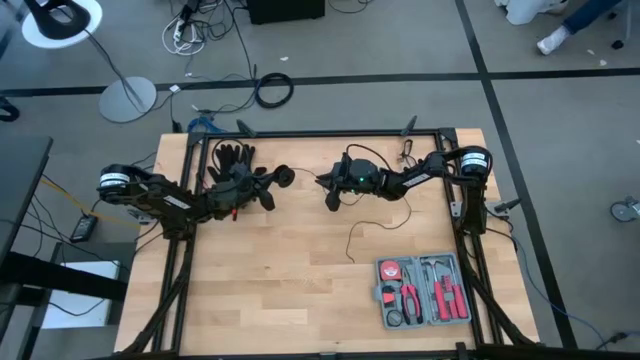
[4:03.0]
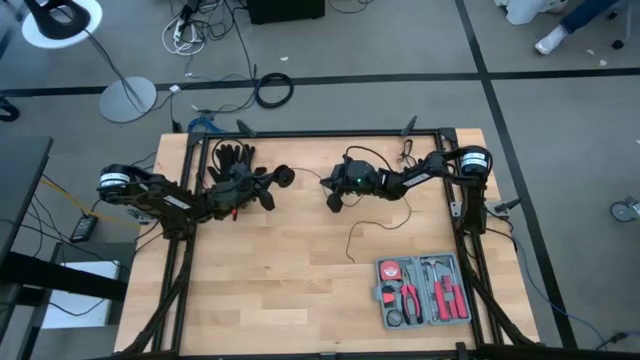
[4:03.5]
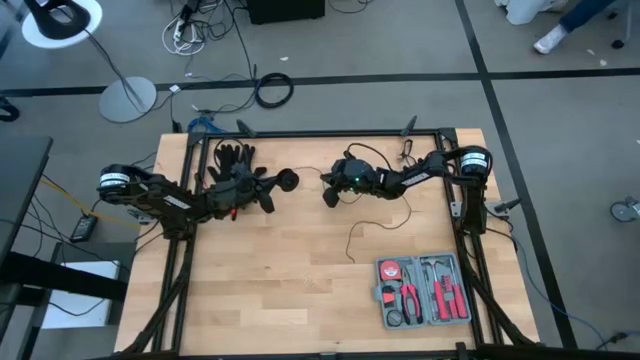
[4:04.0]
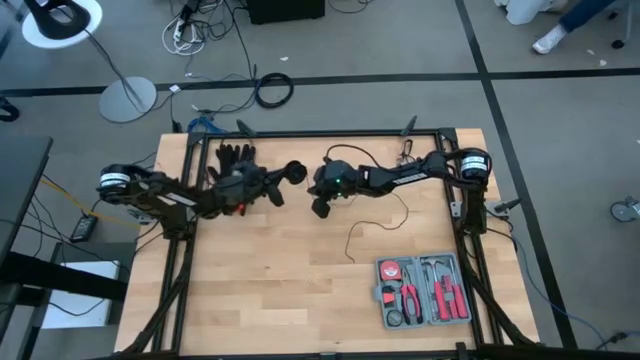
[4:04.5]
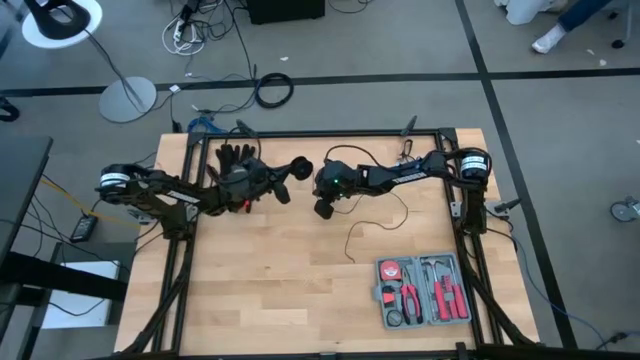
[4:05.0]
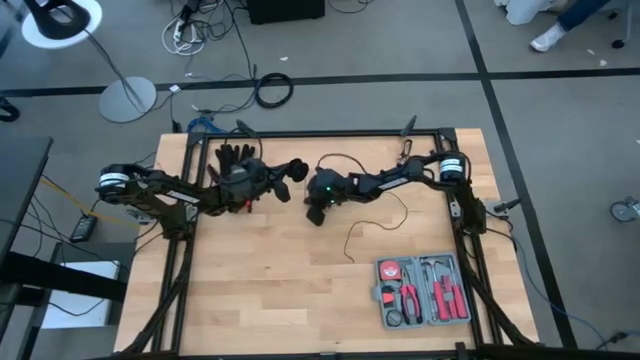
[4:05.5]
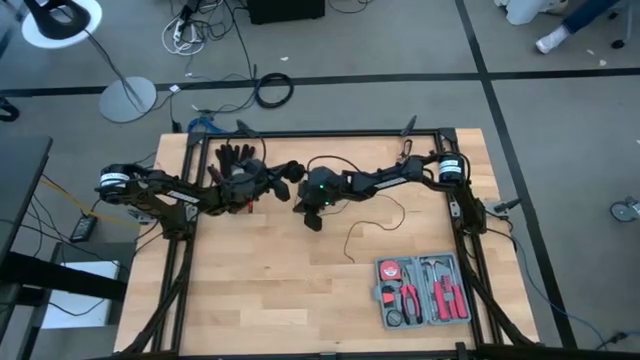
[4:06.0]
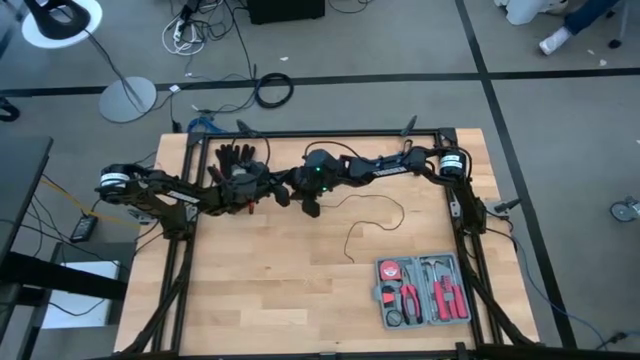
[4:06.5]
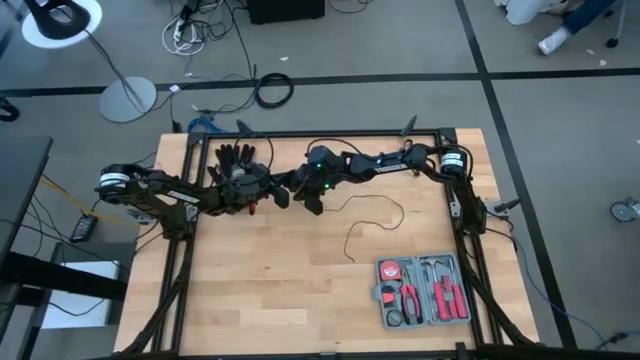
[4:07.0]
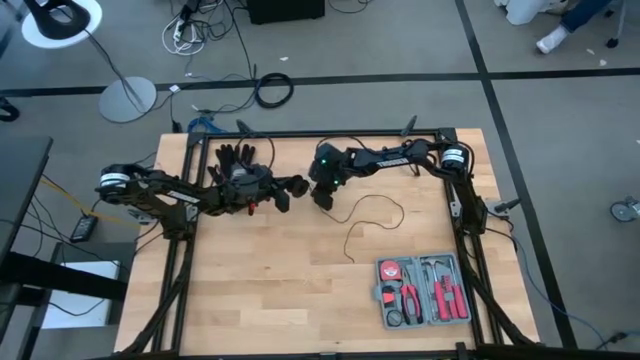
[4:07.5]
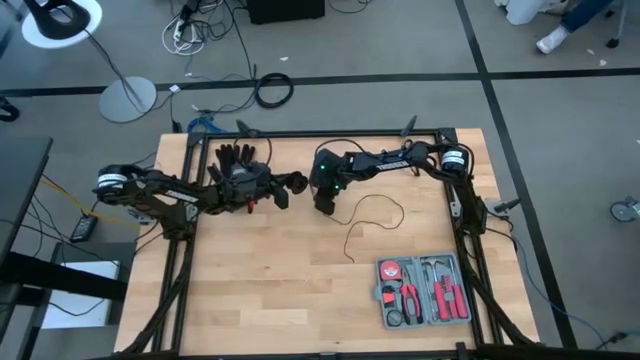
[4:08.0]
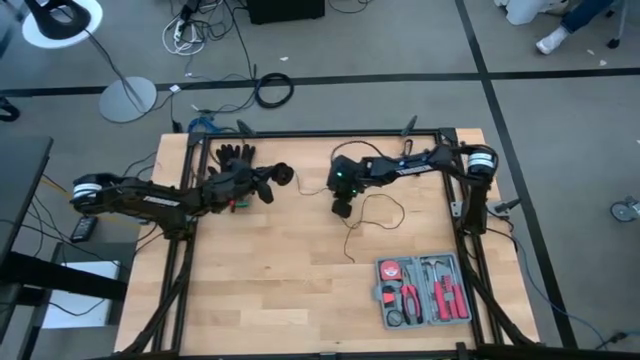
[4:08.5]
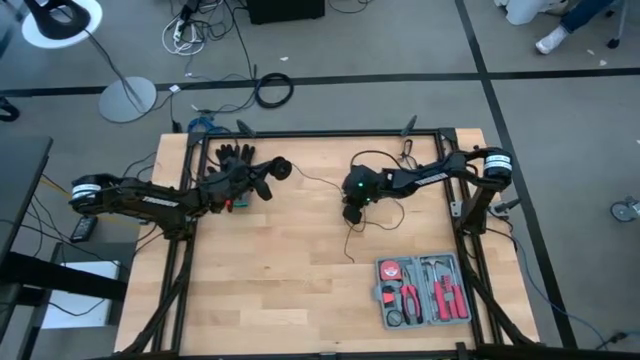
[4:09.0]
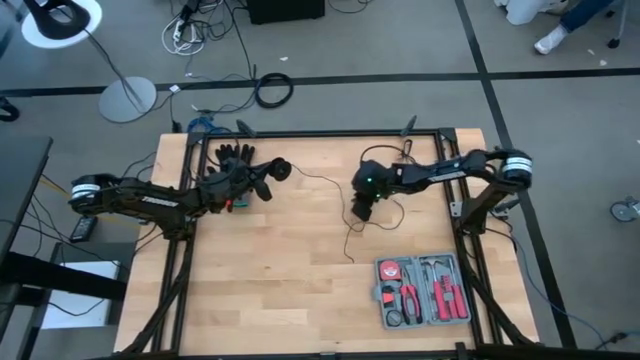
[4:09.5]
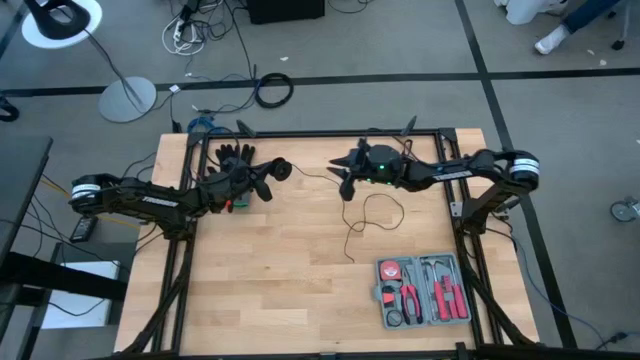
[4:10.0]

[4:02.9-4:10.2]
Task: Coil cords
Coil the black wire

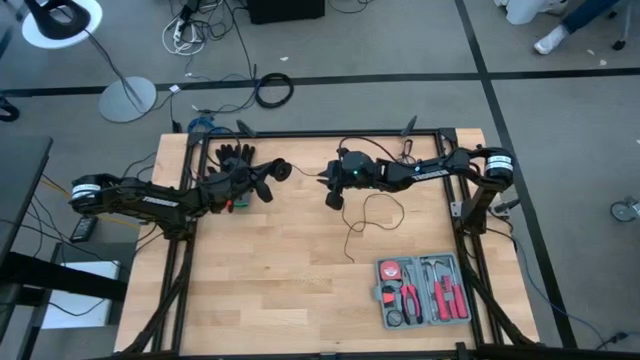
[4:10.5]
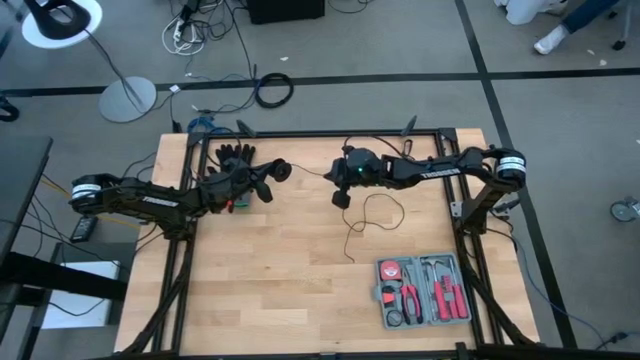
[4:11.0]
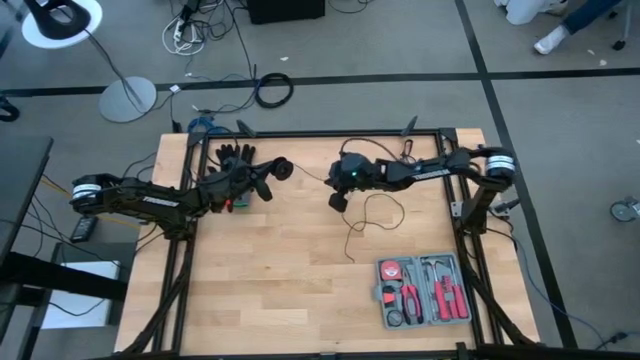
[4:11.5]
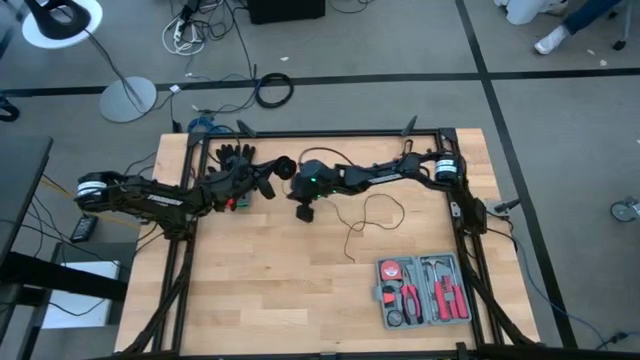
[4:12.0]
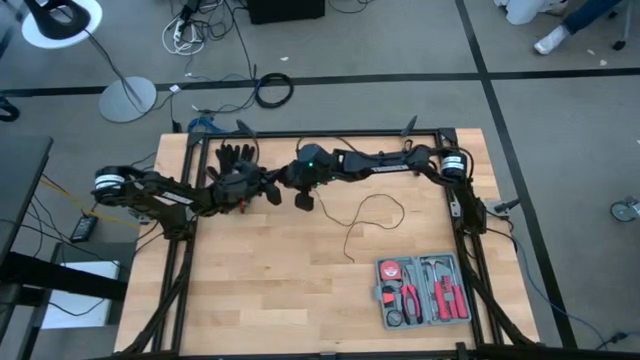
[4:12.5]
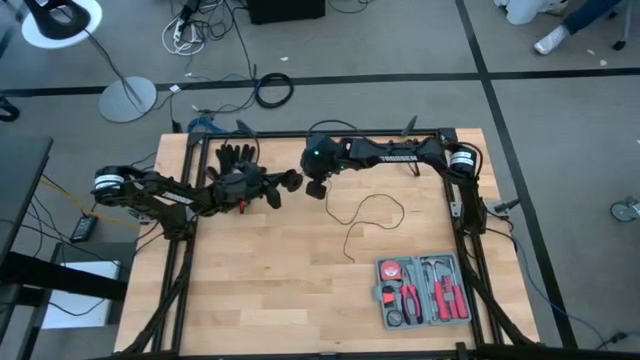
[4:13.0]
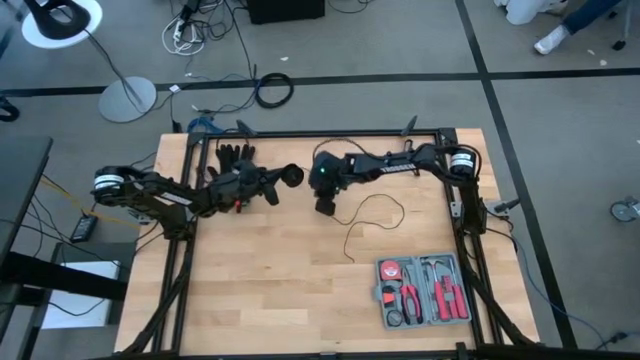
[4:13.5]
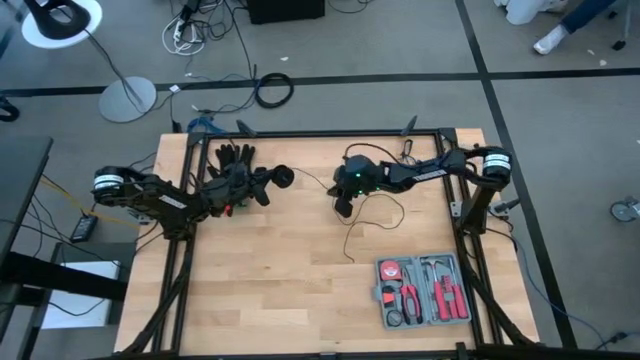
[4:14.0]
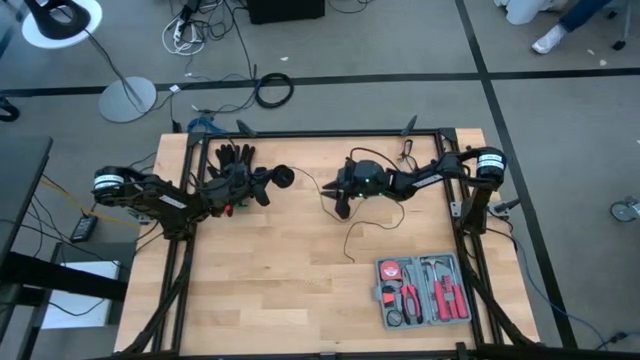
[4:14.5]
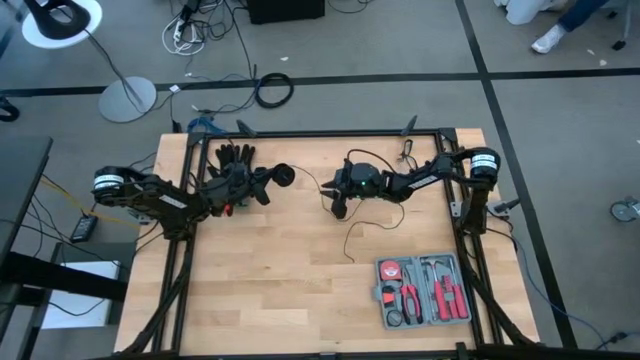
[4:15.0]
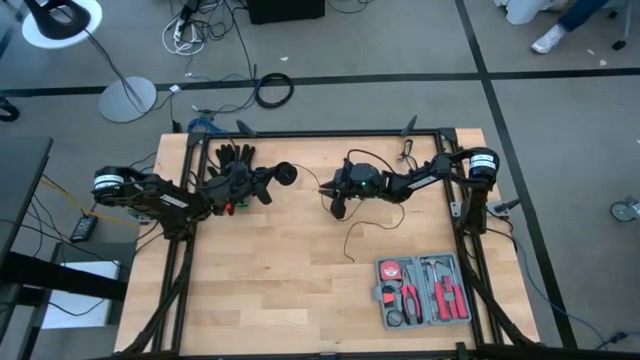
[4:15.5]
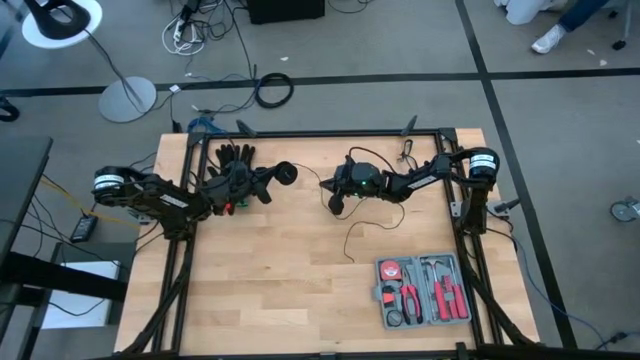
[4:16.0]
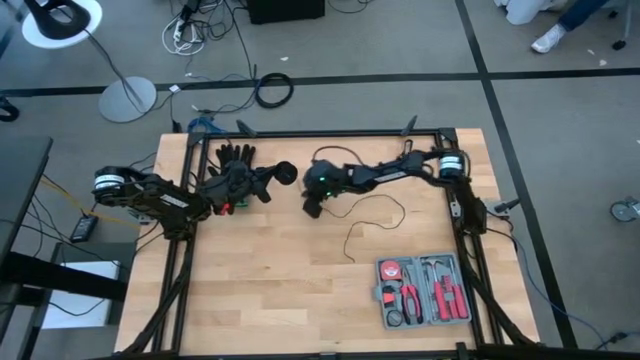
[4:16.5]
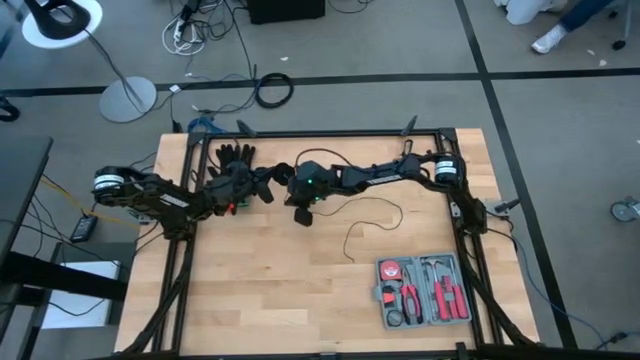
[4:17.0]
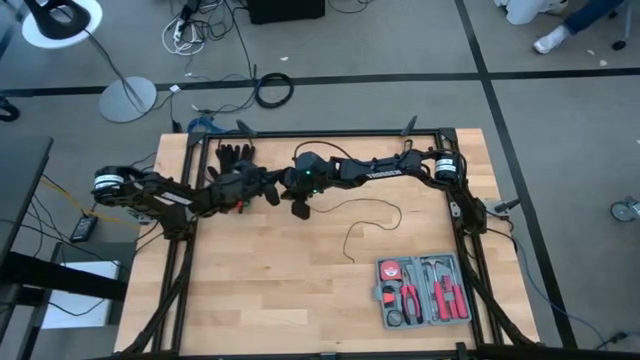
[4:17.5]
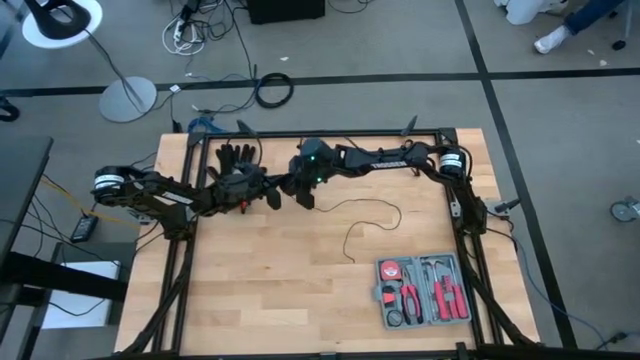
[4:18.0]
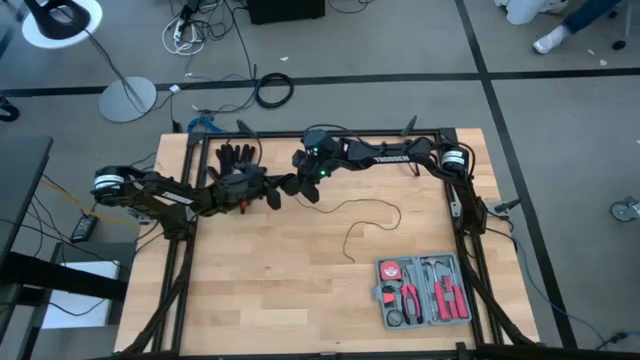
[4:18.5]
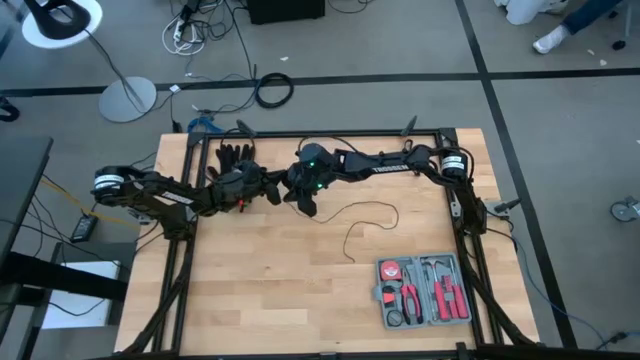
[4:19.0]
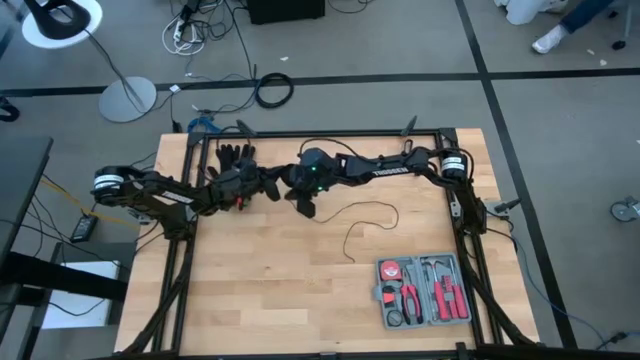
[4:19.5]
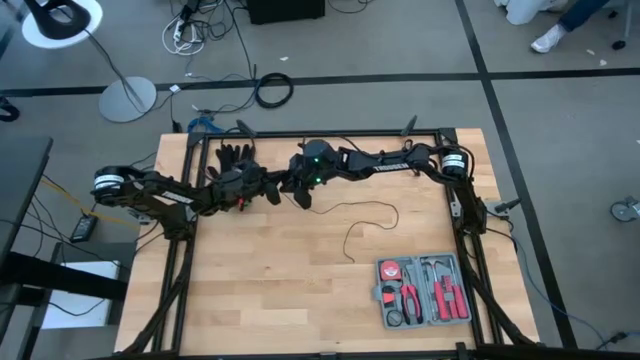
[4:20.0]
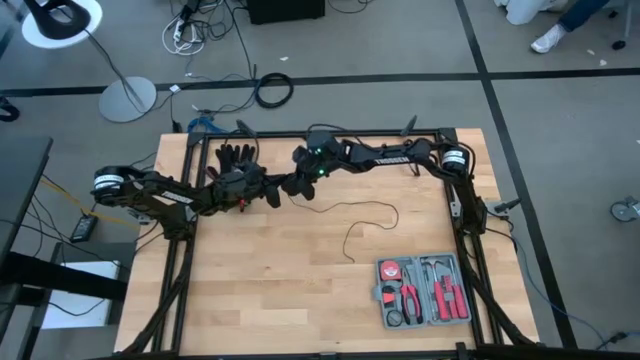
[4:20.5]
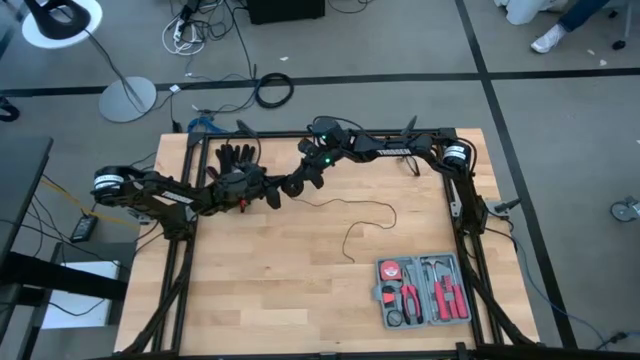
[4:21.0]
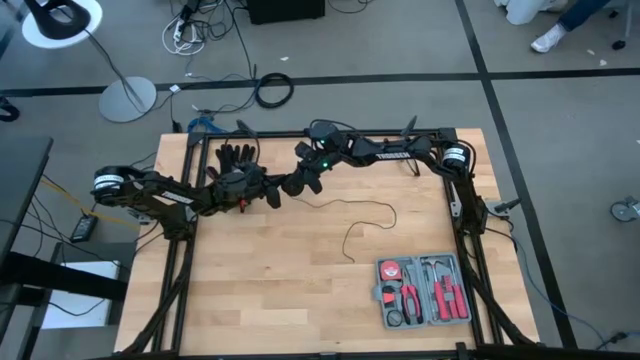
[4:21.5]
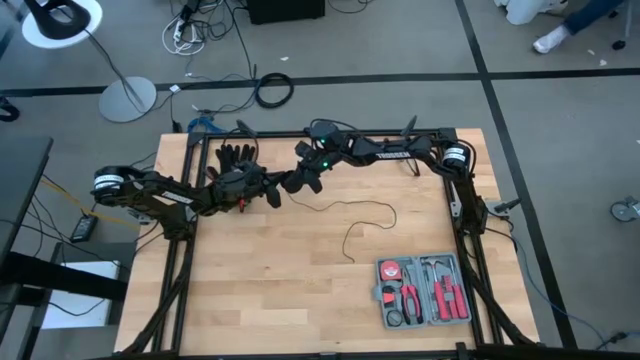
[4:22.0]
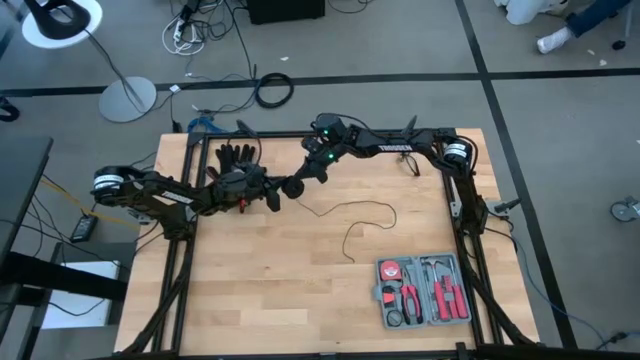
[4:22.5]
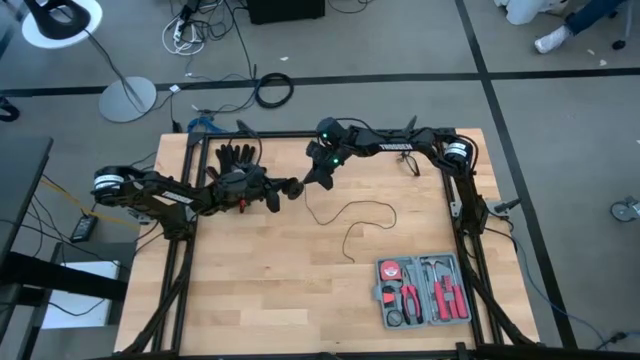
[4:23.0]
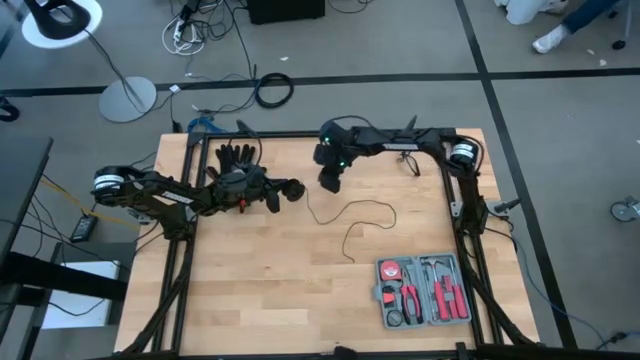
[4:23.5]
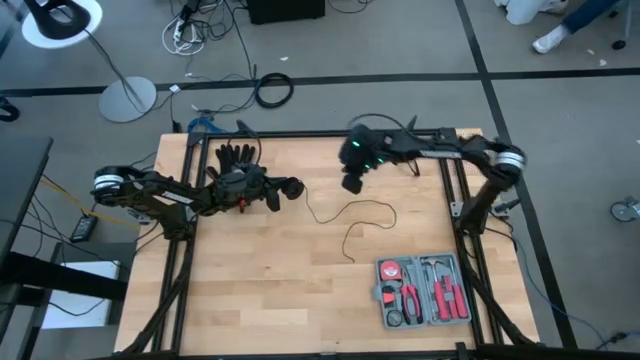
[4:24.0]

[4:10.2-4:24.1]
Coil the black wire
